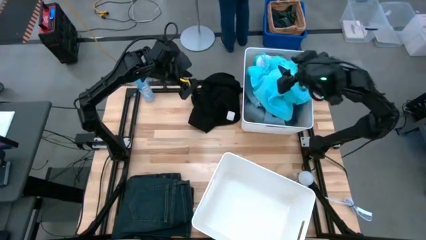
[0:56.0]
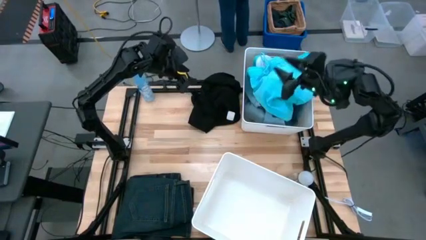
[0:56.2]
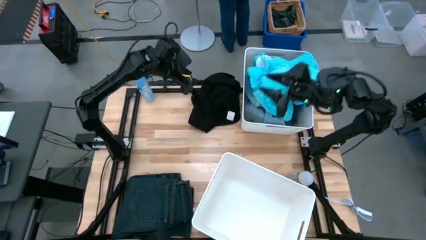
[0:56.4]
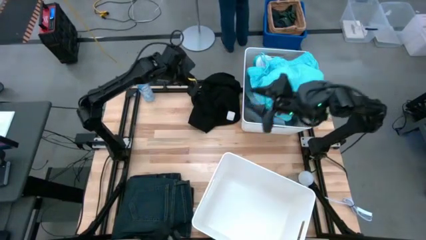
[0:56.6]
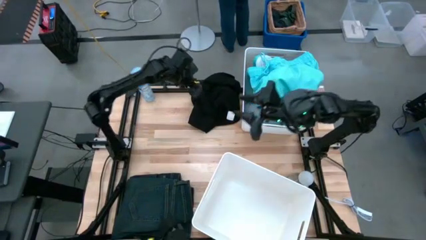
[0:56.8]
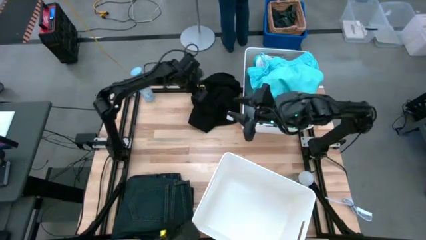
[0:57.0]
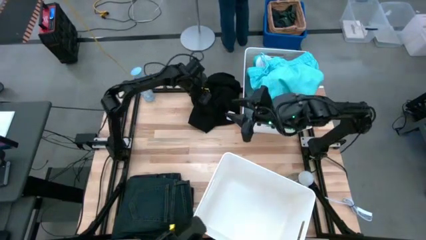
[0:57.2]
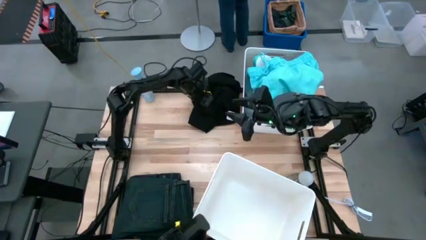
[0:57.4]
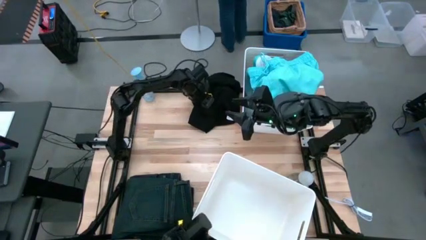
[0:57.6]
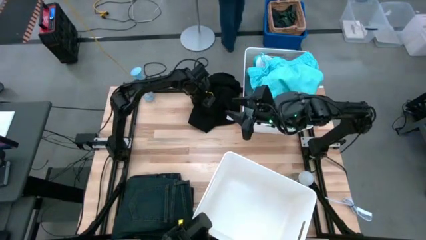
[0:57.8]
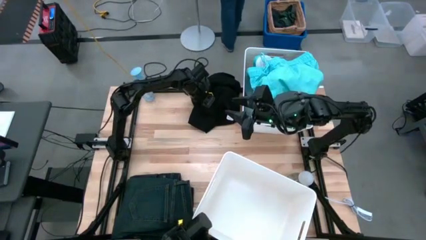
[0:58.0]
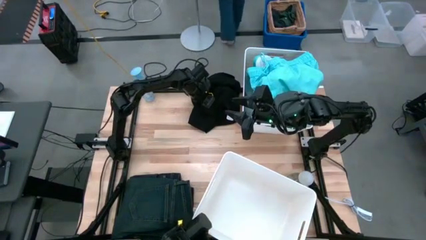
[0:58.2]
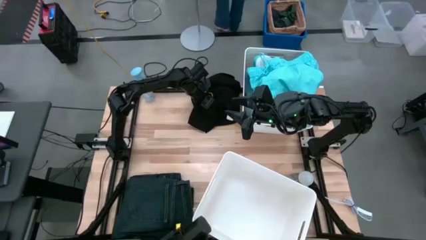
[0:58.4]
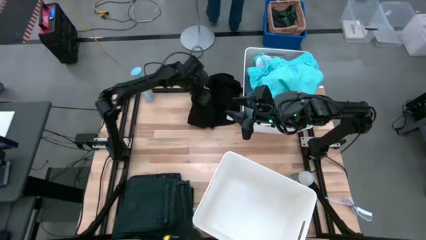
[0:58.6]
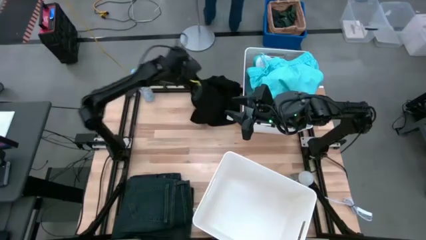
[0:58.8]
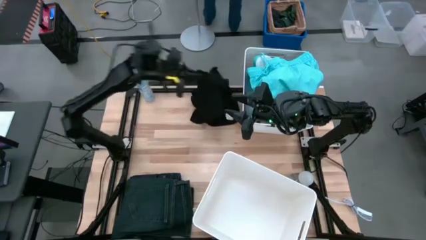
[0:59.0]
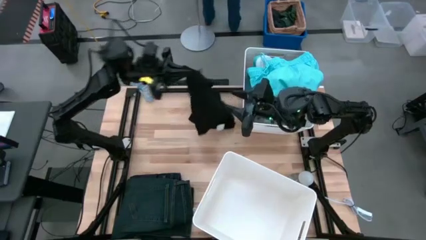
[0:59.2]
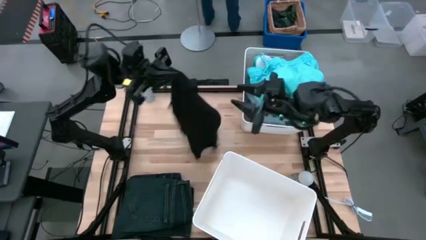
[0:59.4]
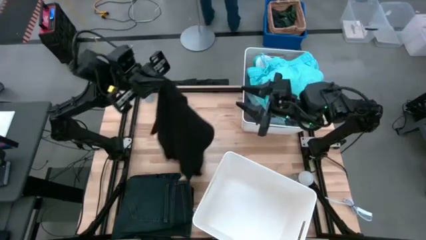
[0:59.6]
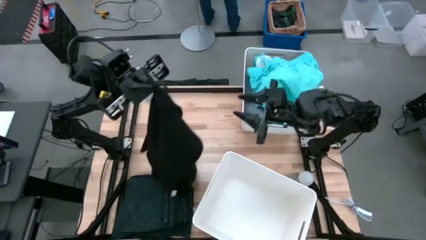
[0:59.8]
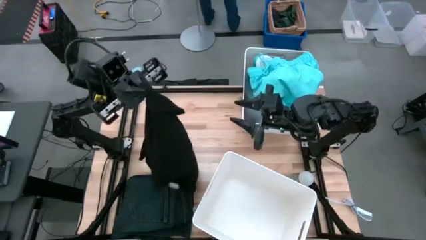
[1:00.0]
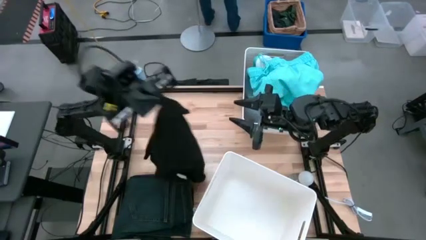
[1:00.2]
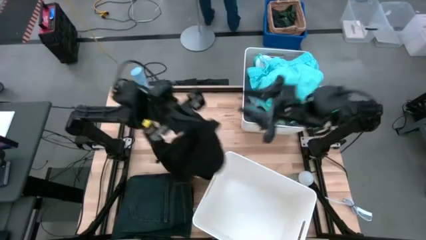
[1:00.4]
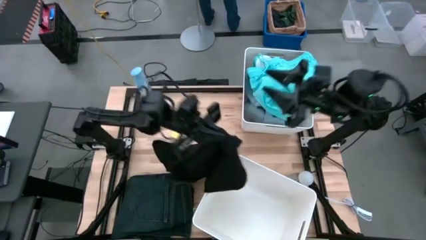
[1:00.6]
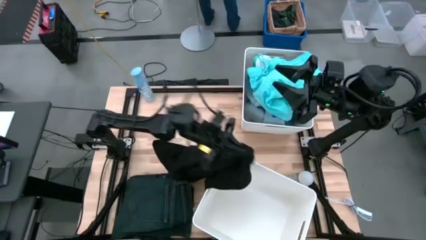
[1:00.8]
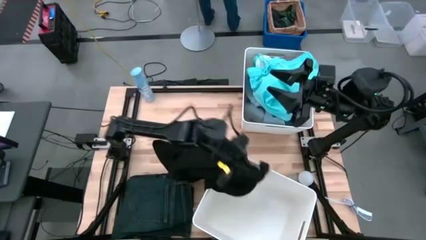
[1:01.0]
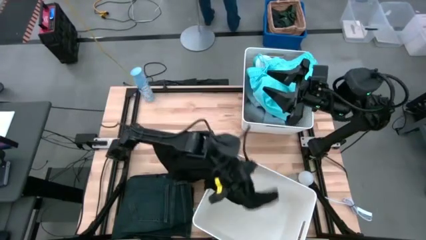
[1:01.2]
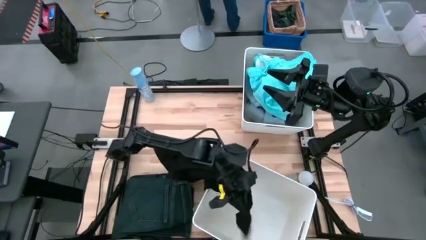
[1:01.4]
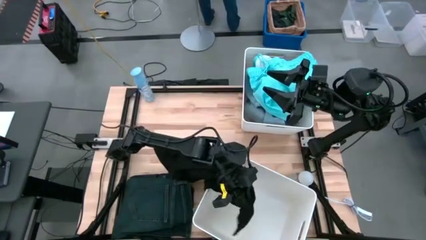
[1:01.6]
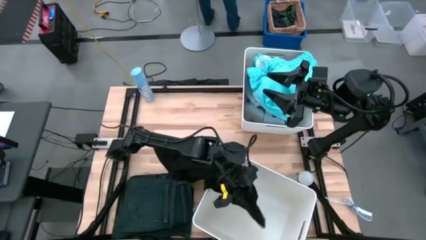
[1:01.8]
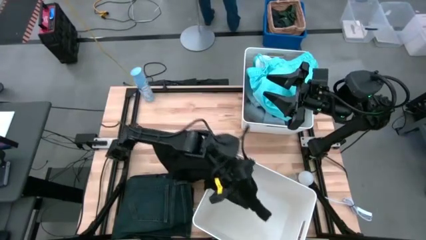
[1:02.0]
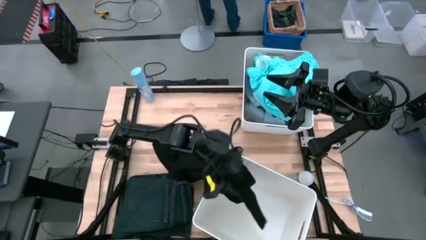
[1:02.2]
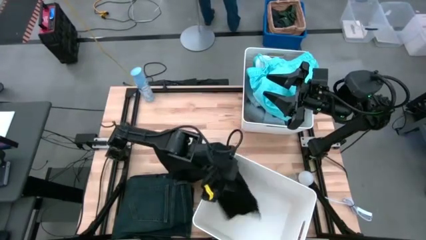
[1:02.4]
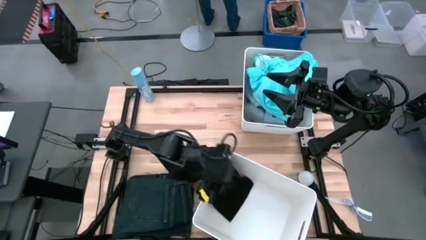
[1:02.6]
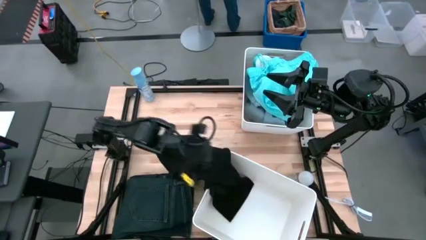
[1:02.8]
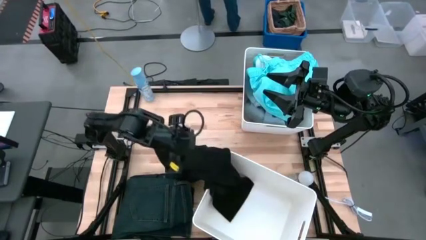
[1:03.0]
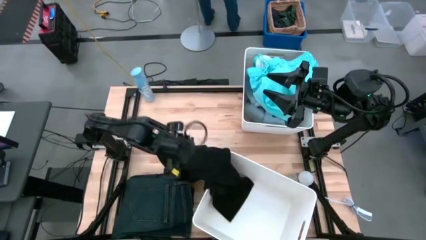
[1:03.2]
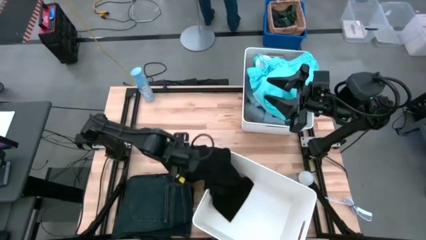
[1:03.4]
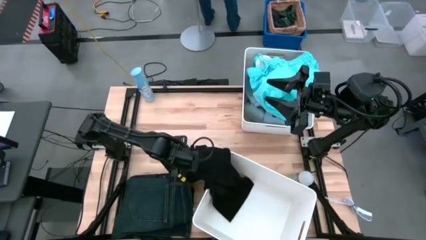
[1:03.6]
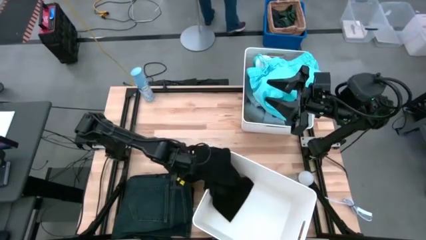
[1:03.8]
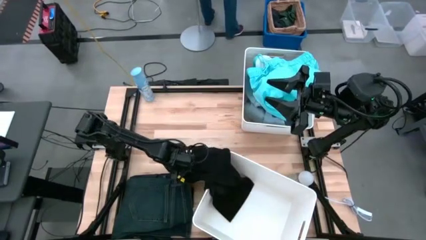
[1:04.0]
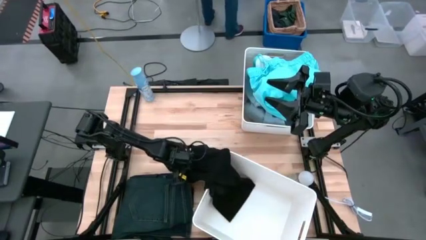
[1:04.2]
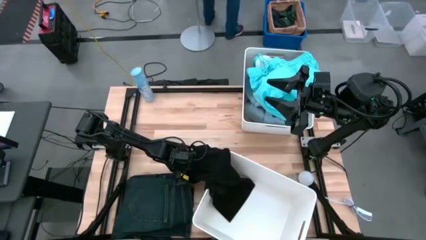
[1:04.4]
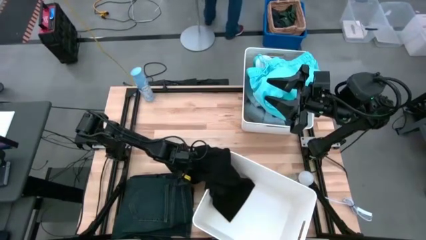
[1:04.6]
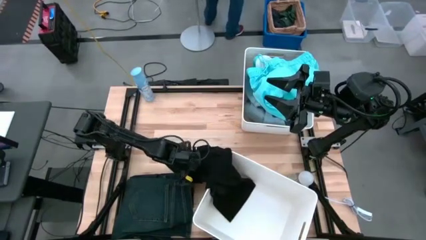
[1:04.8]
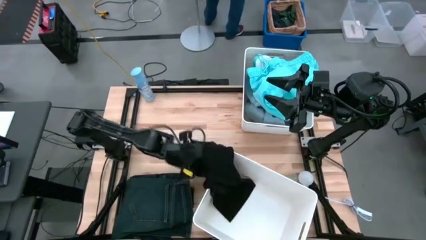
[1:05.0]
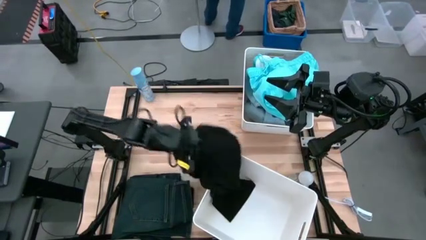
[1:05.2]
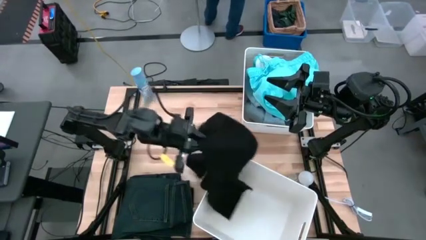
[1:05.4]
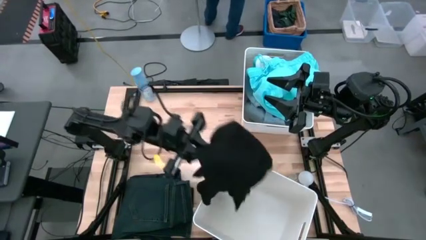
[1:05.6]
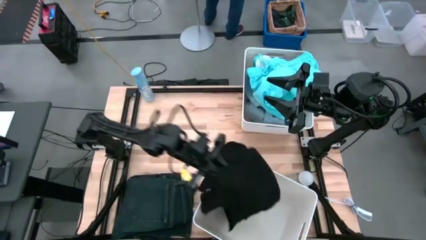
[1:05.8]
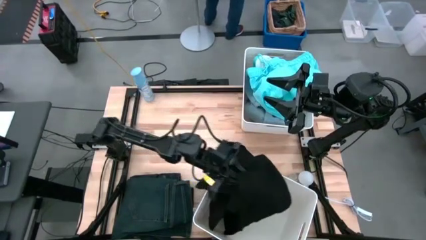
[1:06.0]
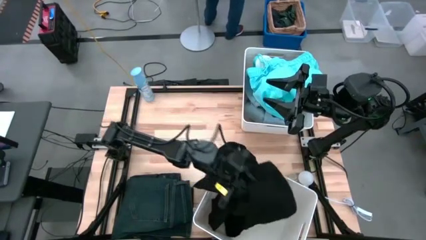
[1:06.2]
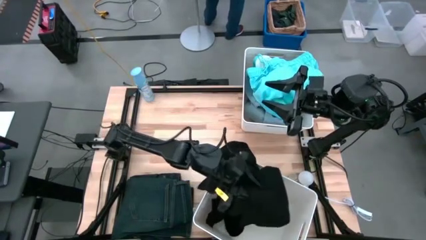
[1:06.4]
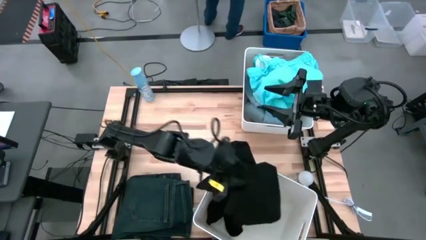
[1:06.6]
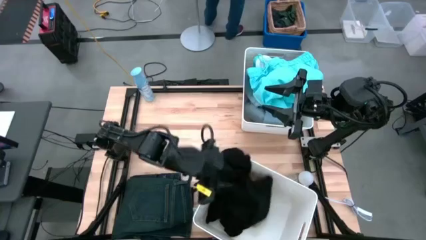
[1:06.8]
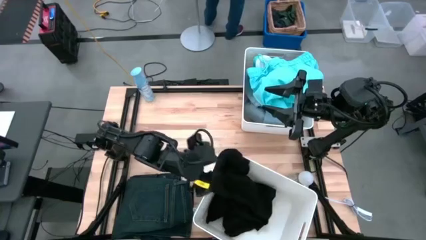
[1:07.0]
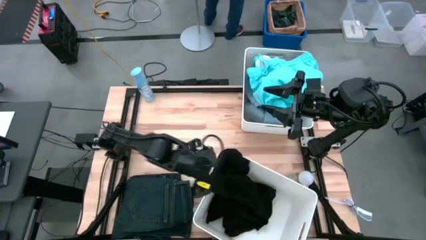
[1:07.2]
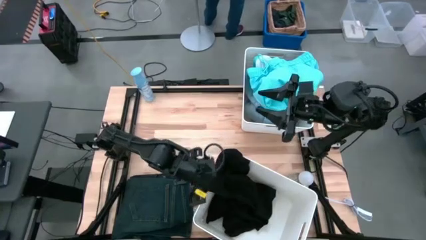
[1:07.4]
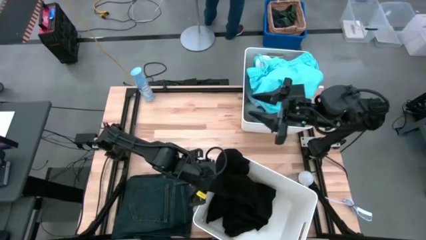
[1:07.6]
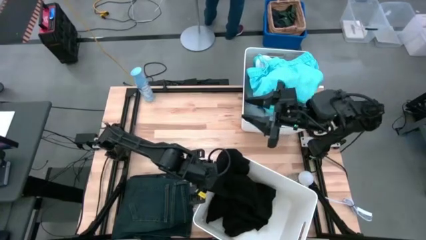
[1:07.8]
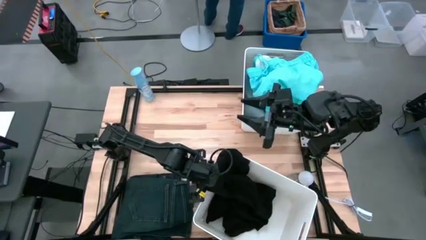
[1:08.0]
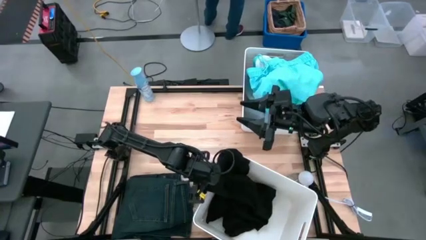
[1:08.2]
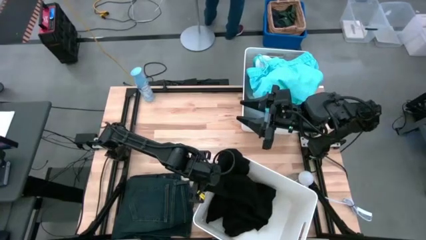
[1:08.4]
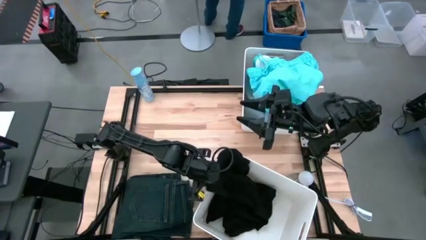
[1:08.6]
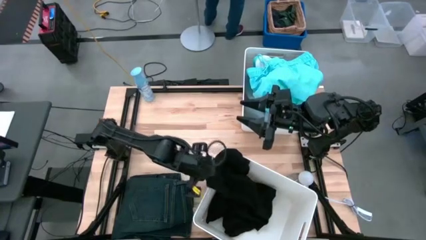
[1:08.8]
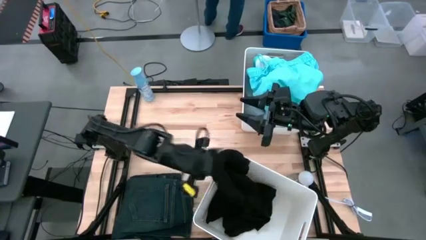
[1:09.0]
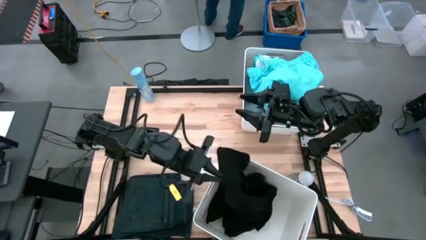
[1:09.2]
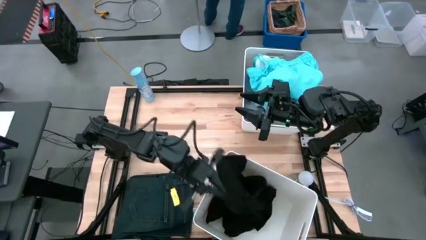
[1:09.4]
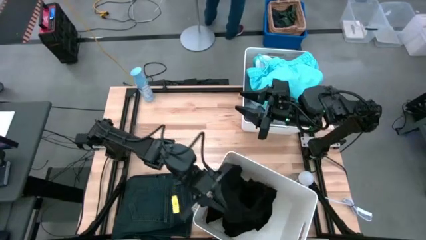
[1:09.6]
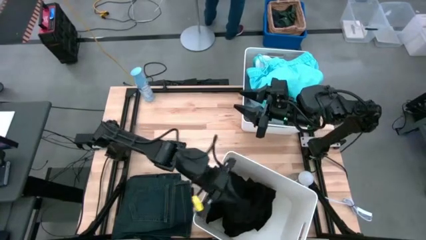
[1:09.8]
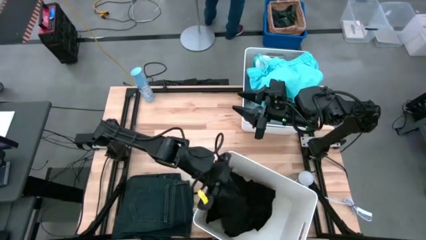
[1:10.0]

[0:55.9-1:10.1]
Task: Sort clothes
Put the black shirt into the bottom white laundry bin
